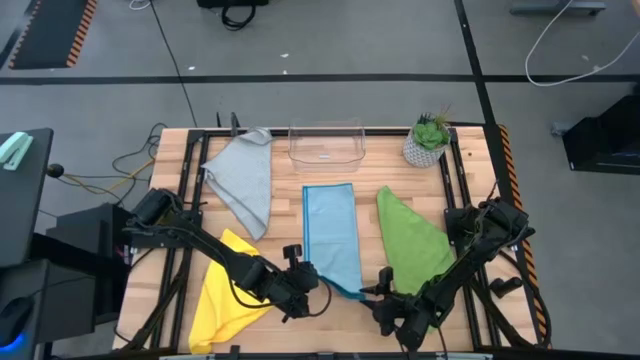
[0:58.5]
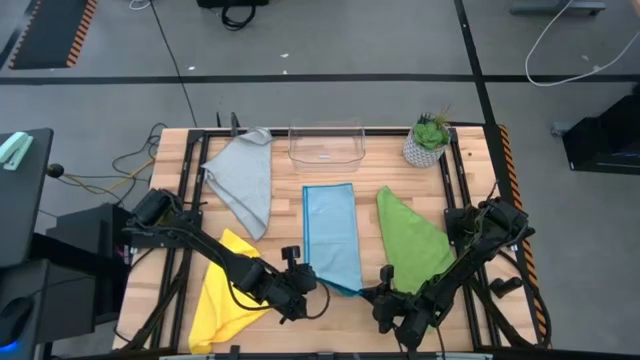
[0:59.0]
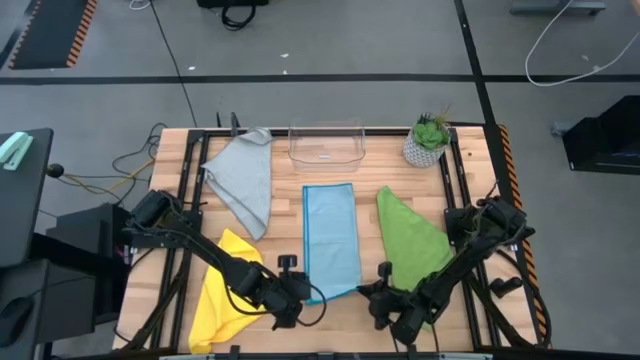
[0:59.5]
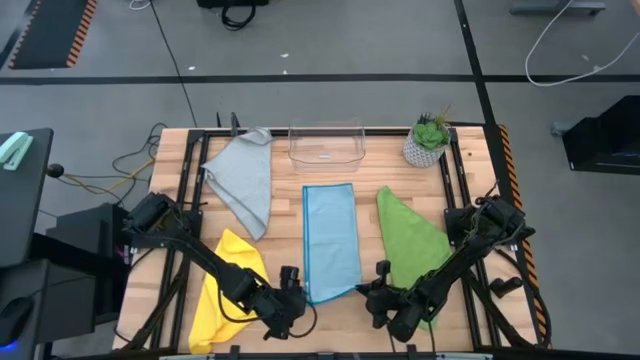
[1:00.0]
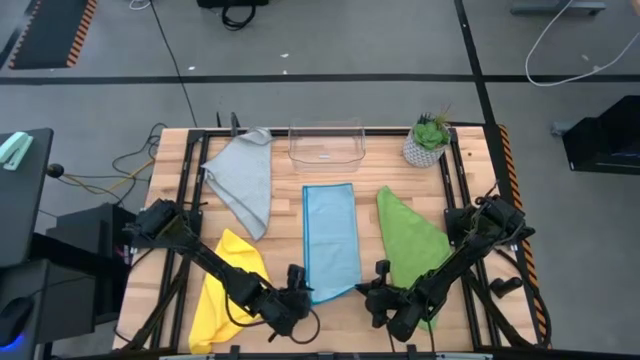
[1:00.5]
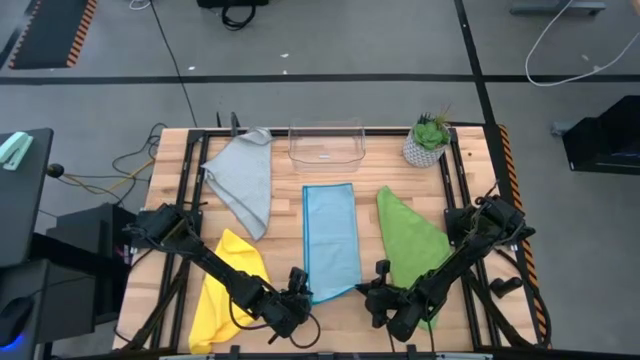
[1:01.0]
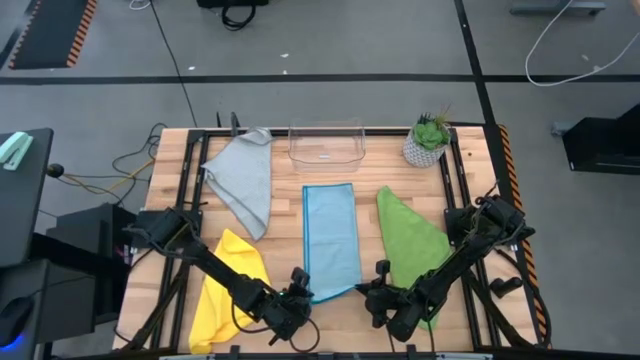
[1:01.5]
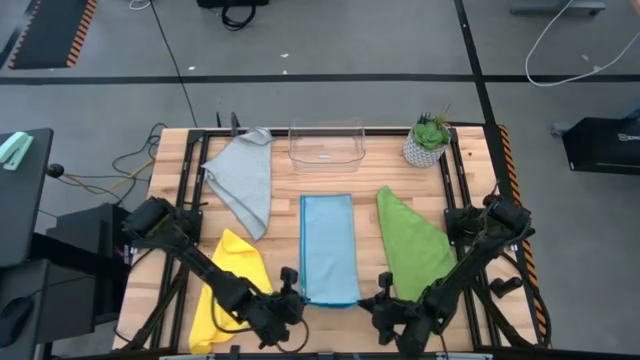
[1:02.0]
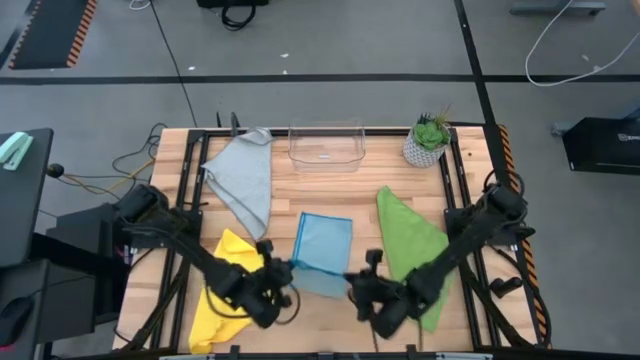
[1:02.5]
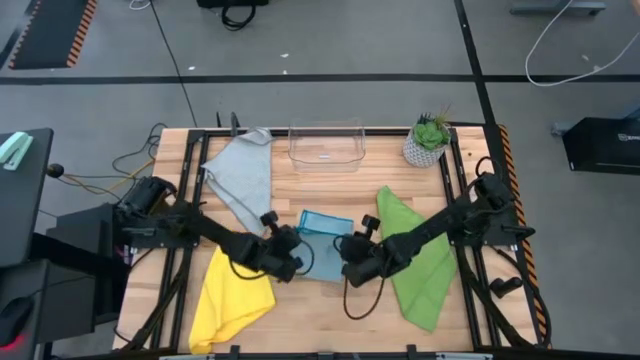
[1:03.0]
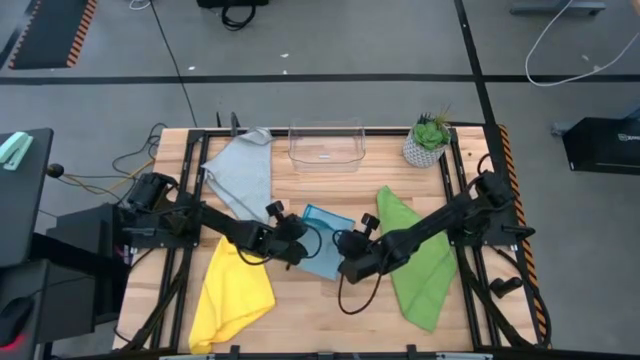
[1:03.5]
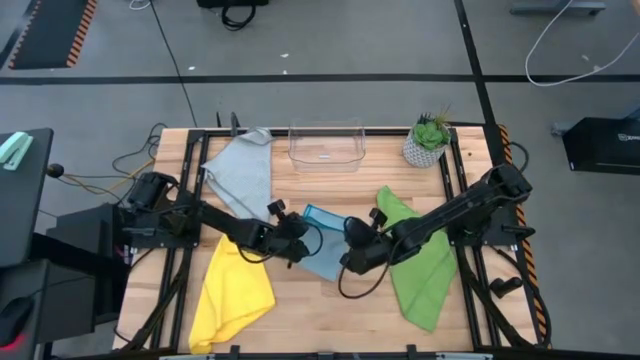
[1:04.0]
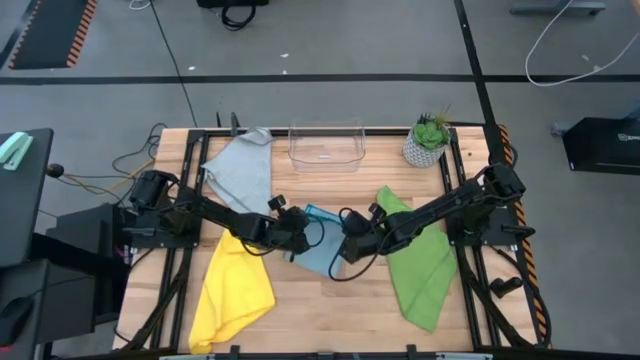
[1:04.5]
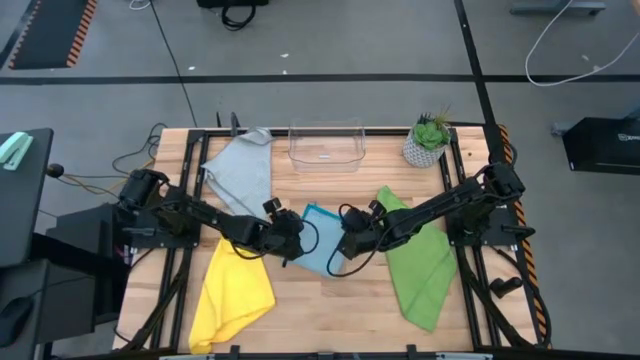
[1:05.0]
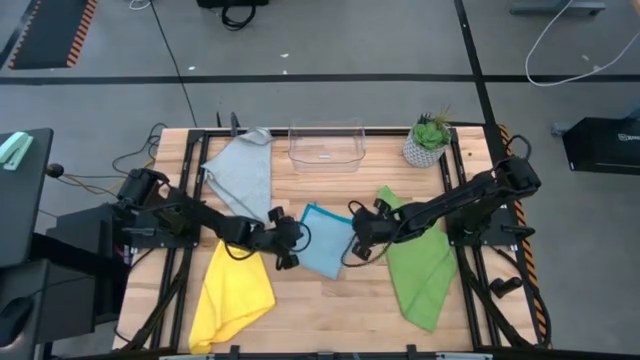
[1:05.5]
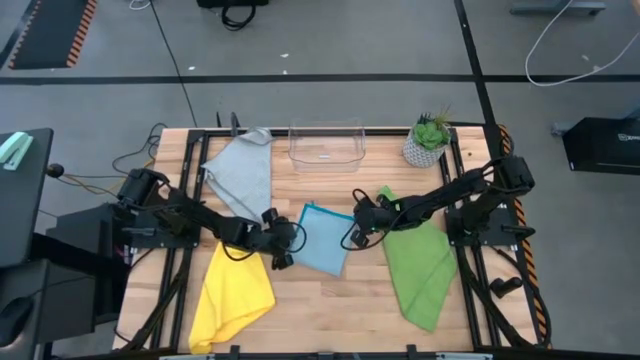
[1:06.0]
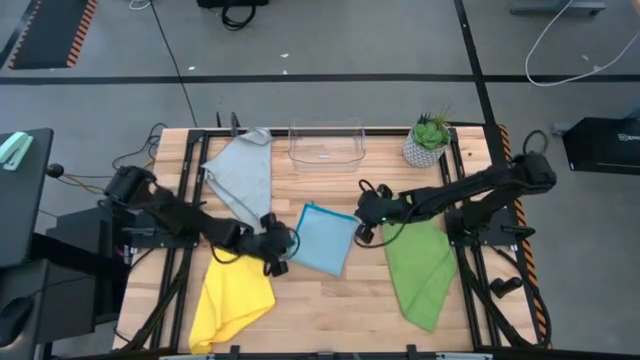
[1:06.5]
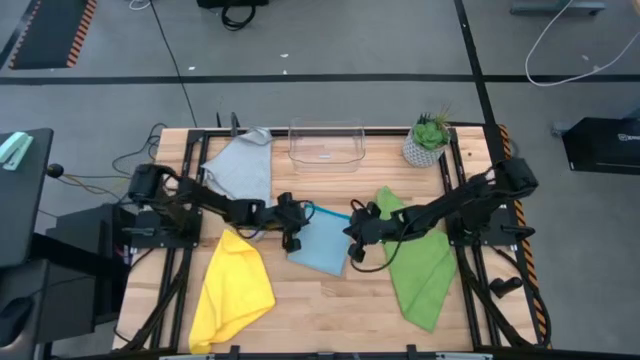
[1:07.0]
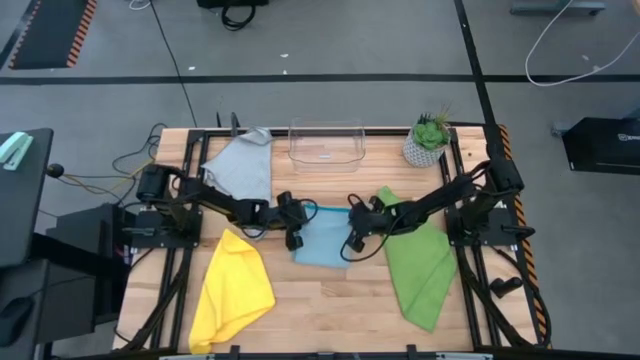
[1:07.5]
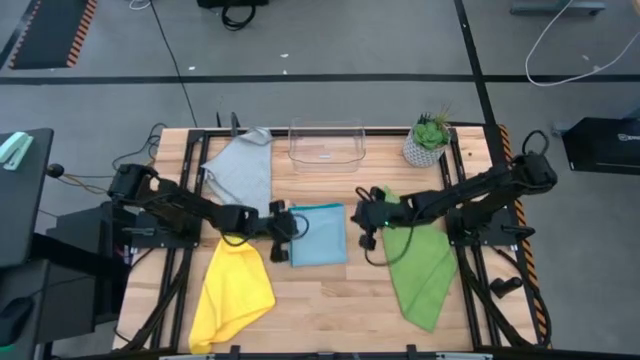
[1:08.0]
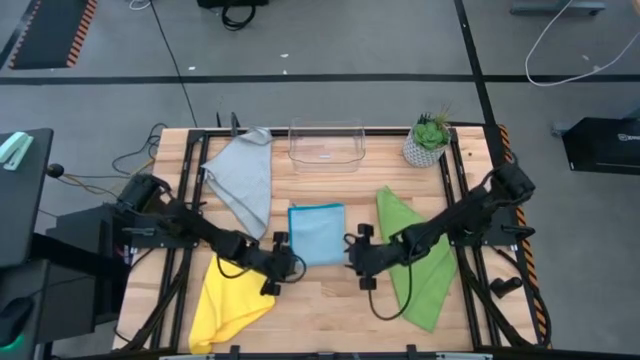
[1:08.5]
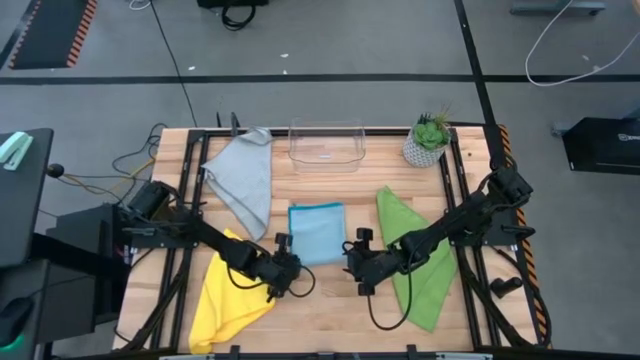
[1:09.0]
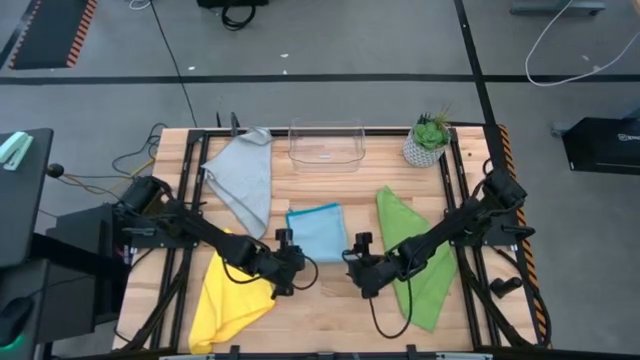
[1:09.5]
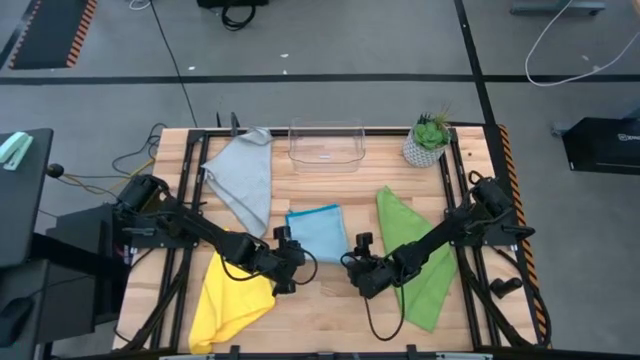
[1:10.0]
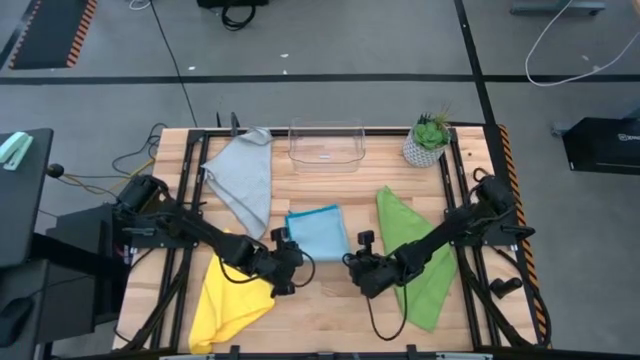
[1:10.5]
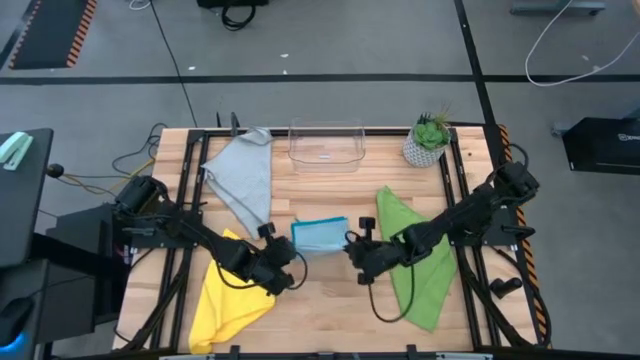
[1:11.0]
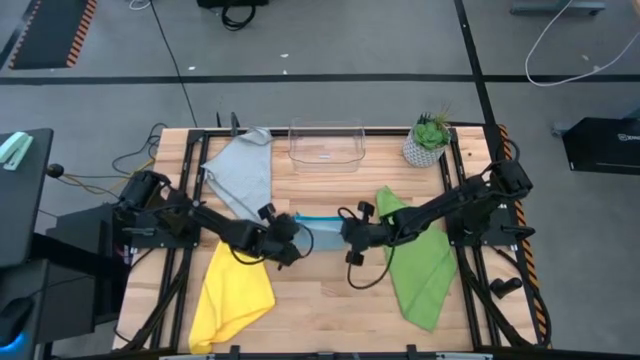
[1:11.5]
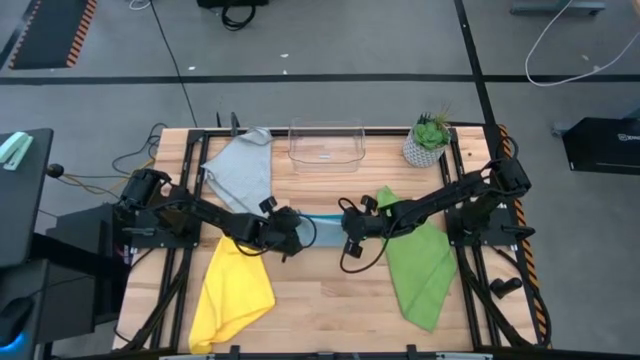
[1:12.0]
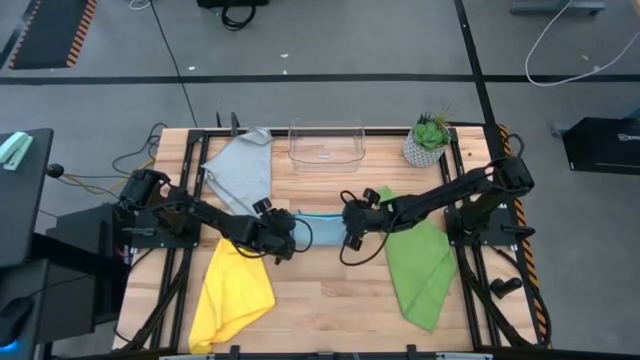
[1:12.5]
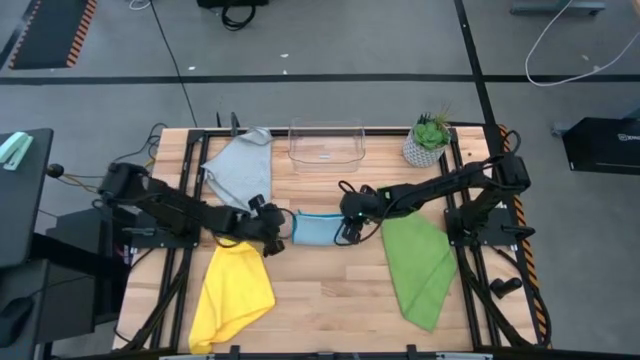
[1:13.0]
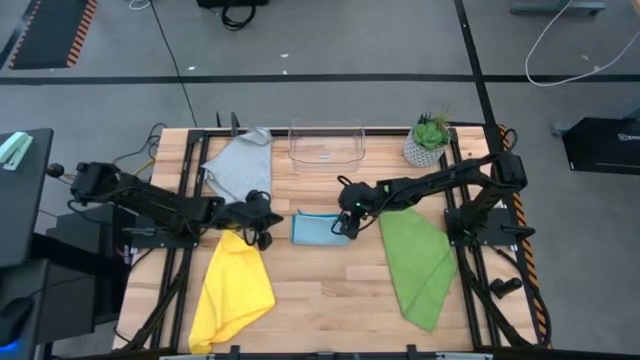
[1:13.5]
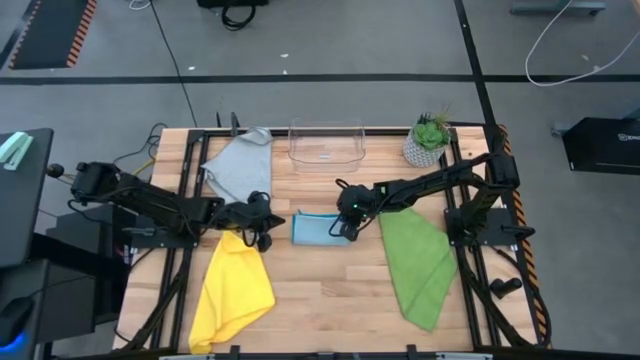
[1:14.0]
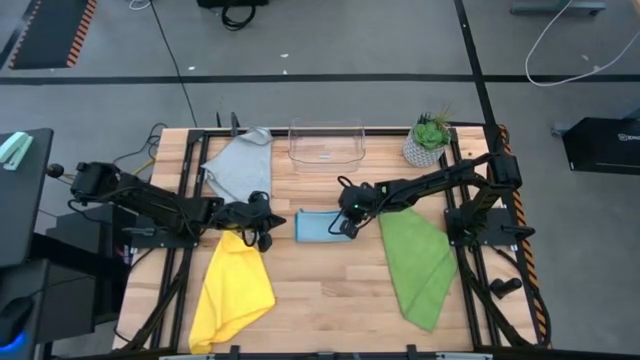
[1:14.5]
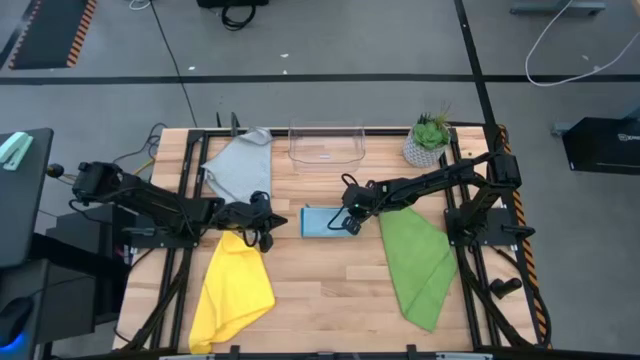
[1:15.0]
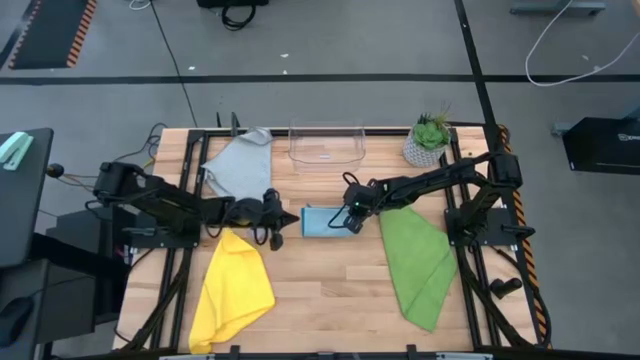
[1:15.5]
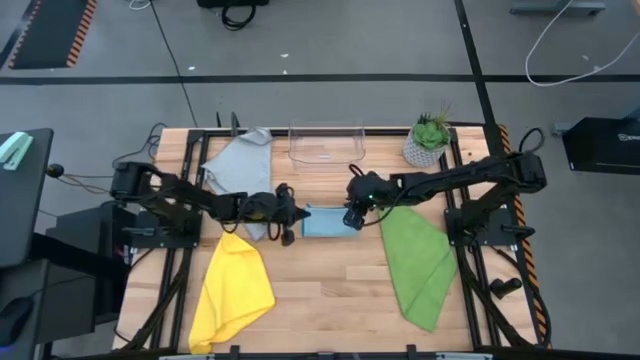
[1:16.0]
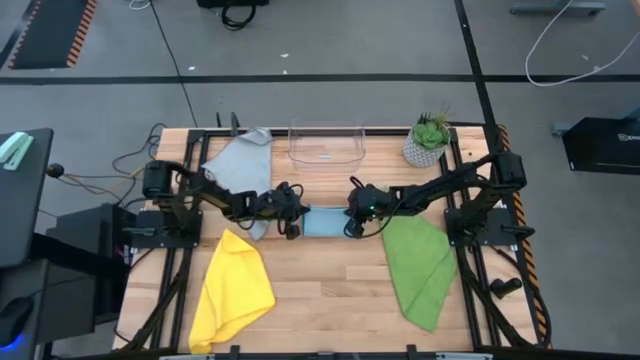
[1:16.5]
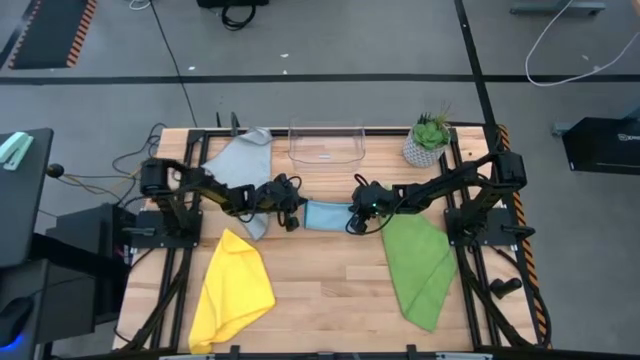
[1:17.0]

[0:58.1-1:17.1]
Task: Fold microfiber towels
Fold the blue microfiber towel
